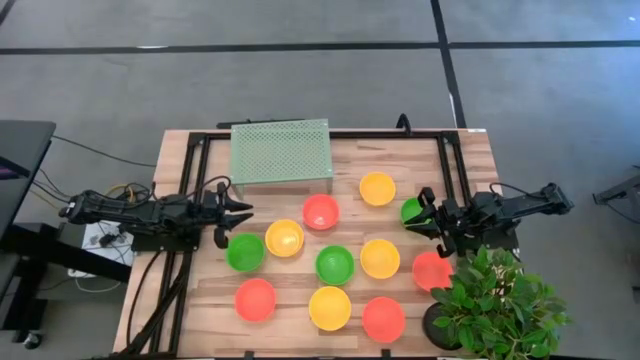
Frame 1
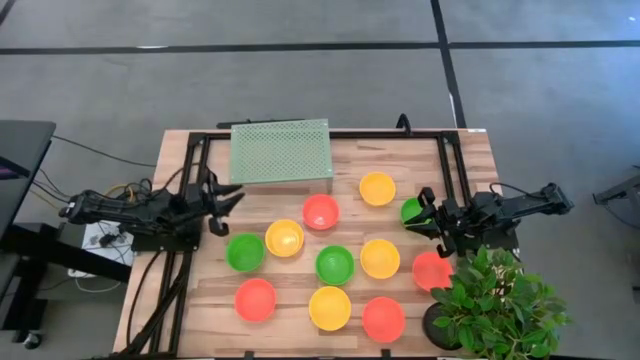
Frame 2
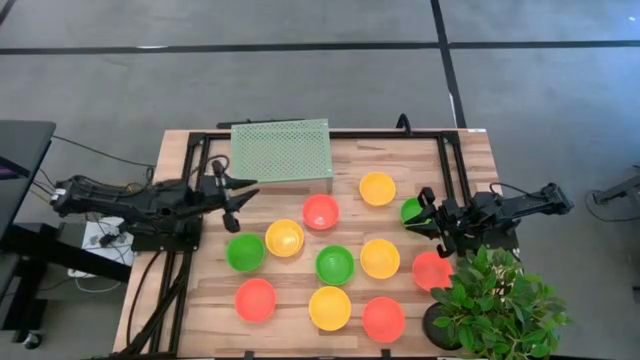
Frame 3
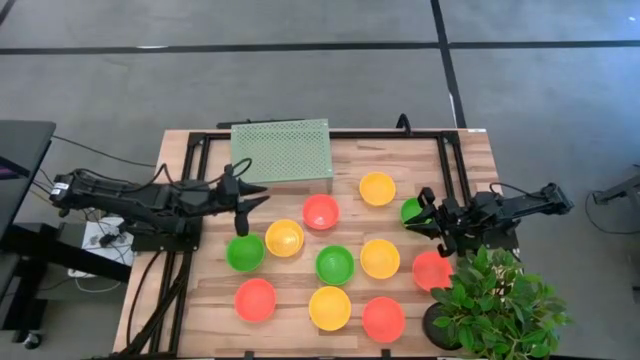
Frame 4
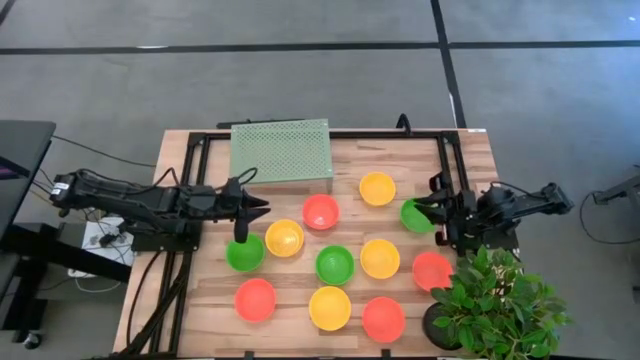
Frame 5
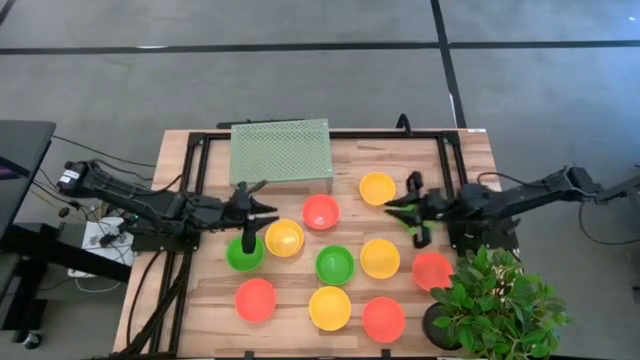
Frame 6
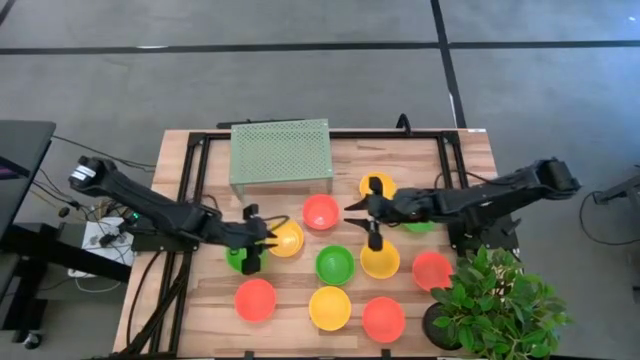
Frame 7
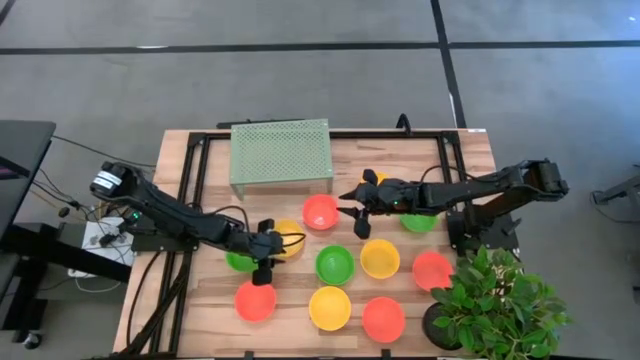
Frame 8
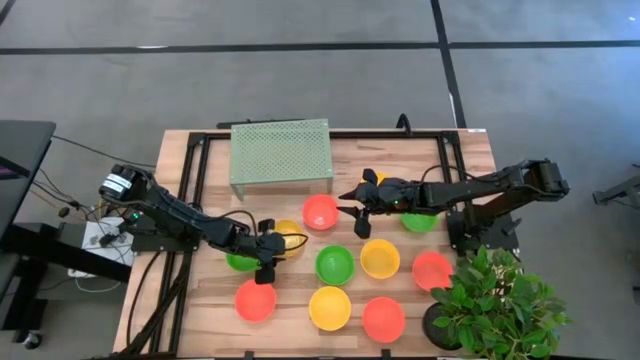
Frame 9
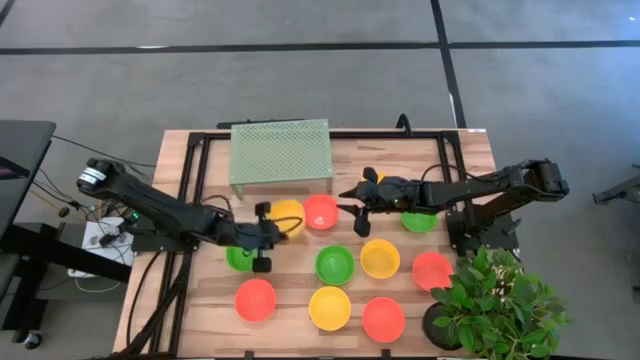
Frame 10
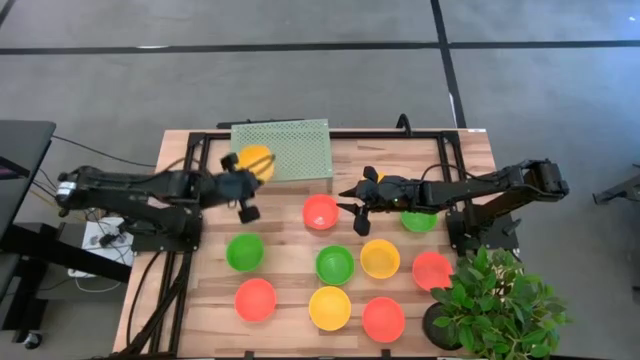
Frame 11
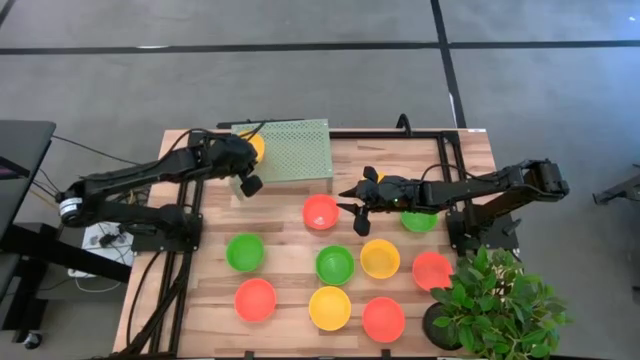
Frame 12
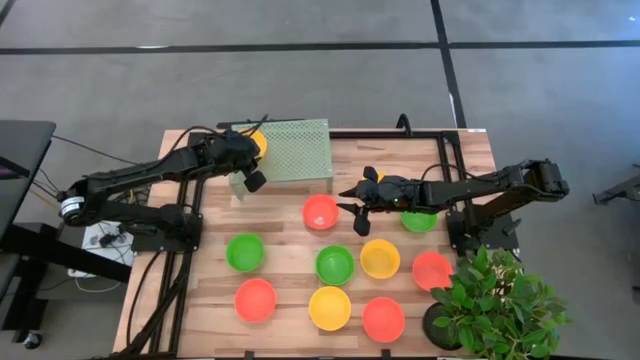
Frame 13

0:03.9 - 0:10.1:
Task: Pick & Place Mini bowls
Put the yellow bowl on the shelf

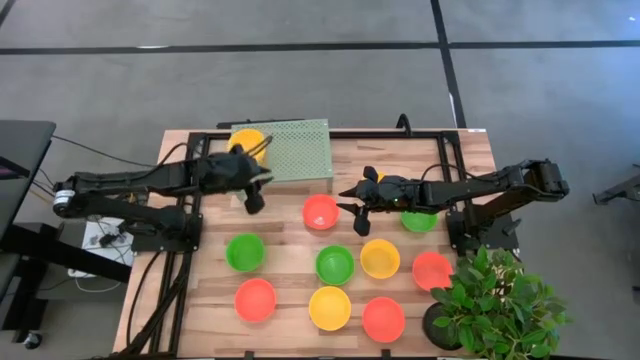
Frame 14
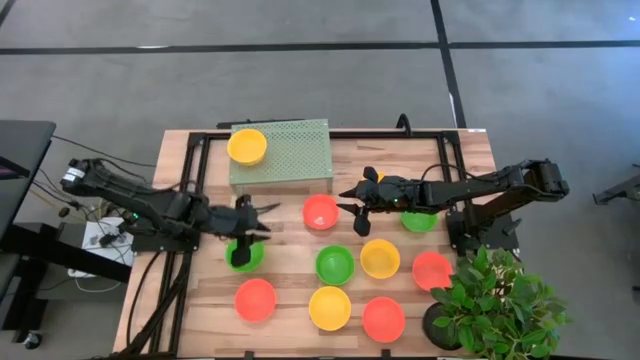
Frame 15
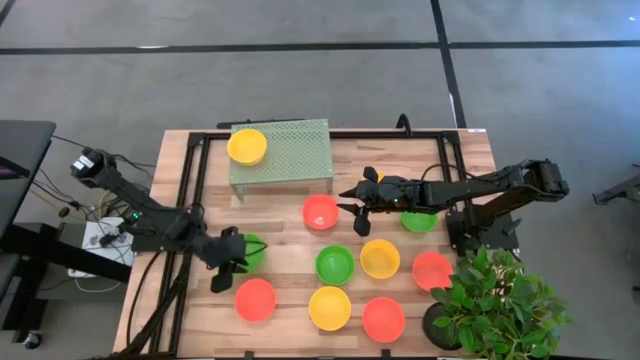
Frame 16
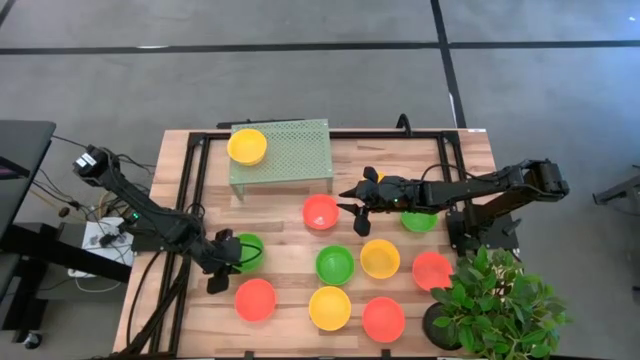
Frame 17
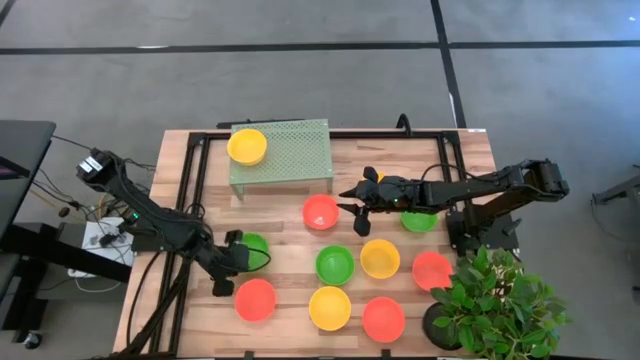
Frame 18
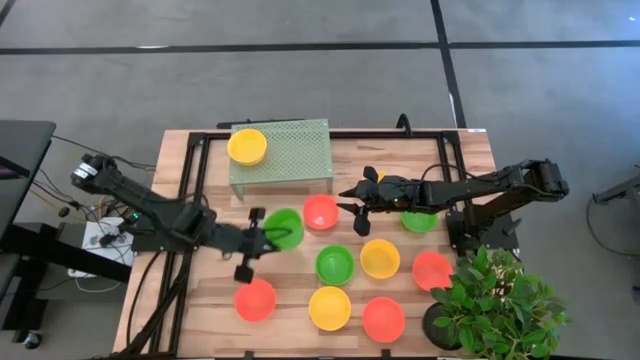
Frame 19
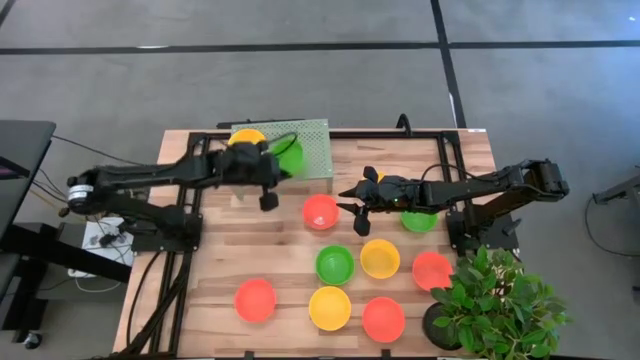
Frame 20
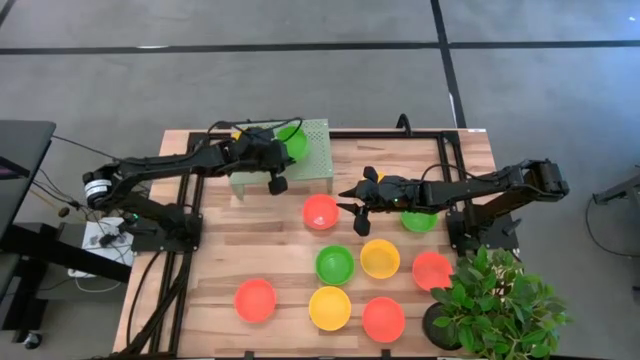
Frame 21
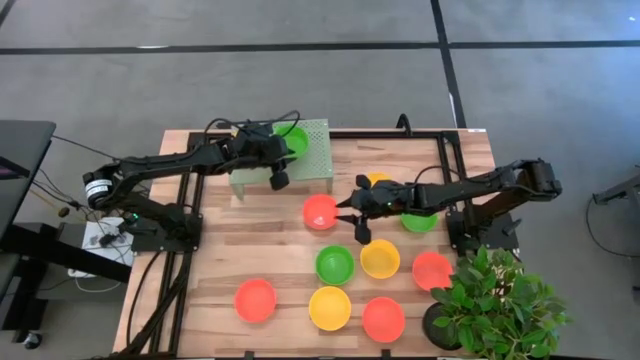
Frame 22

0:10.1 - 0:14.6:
Put the green bowl on the shelf

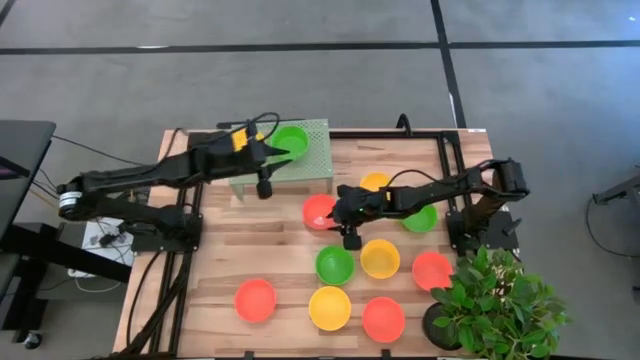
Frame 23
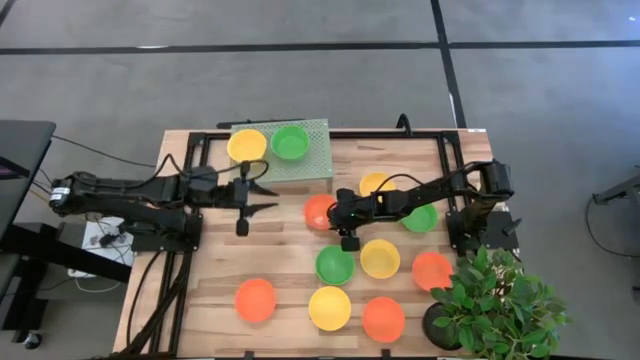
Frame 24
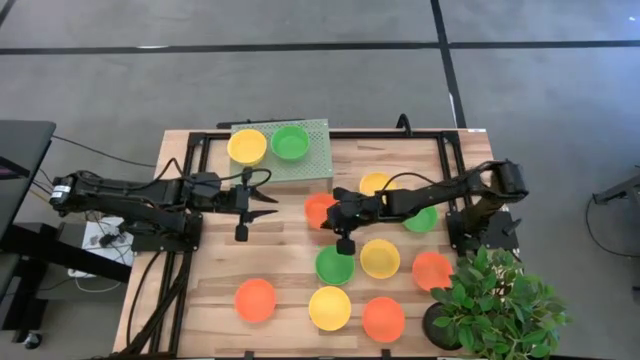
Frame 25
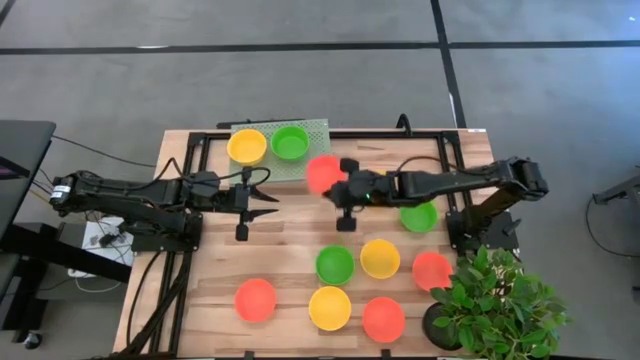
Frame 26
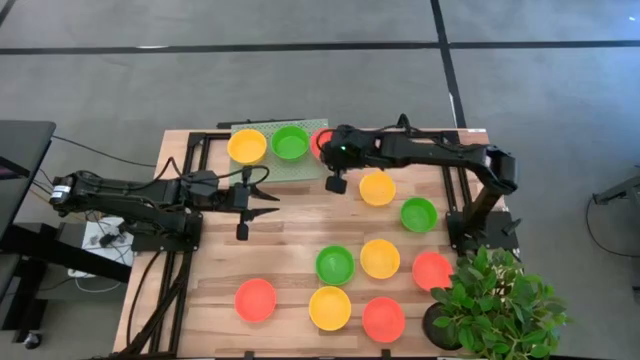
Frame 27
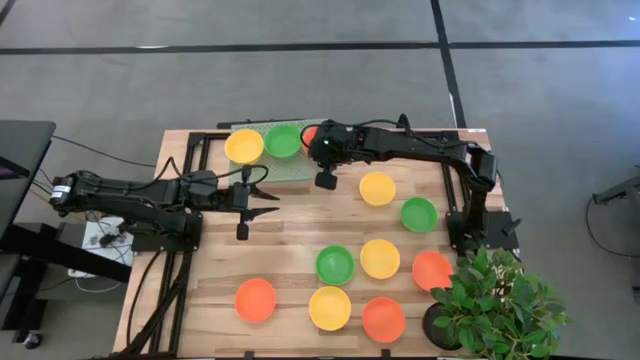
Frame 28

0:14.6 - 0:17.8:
Put the orange bowl on the shelf

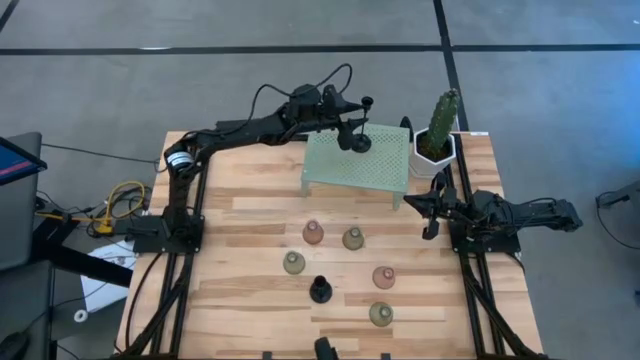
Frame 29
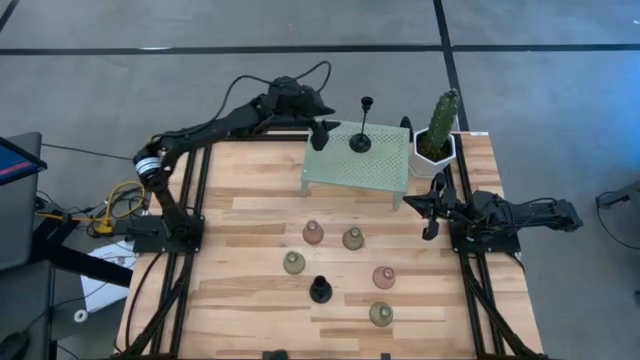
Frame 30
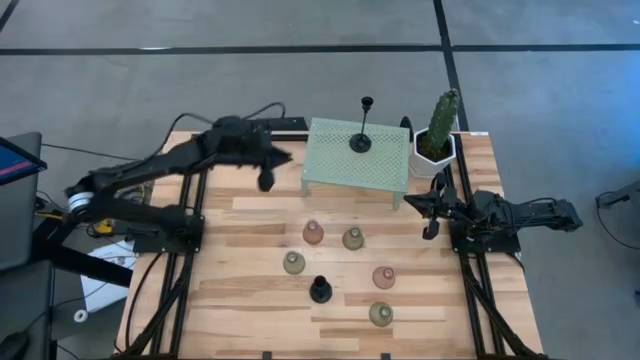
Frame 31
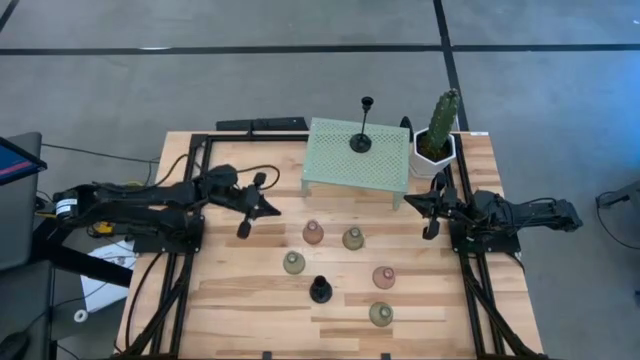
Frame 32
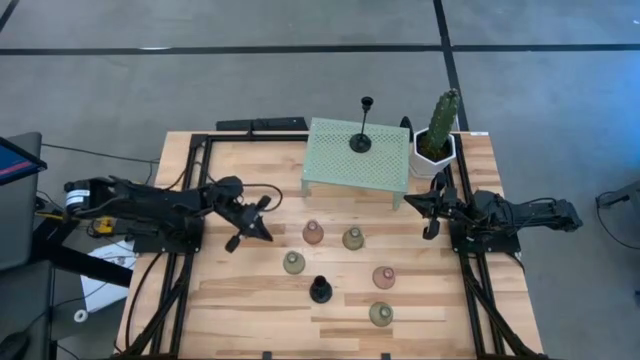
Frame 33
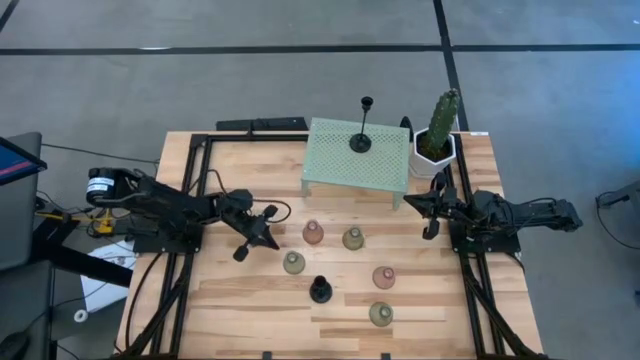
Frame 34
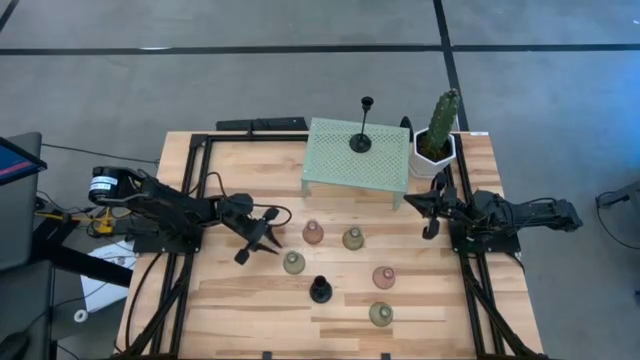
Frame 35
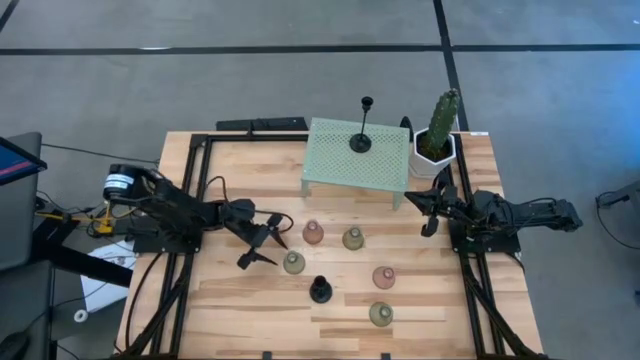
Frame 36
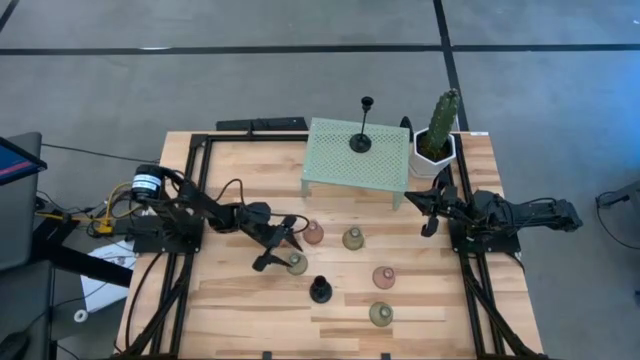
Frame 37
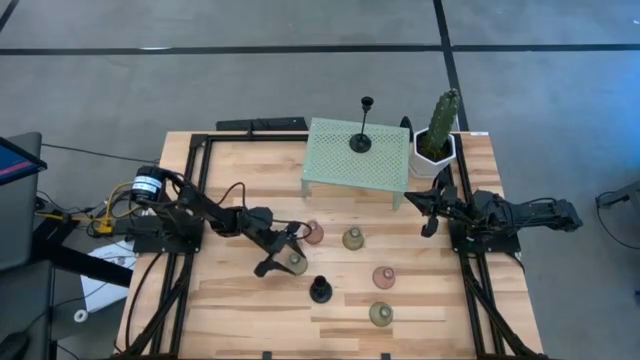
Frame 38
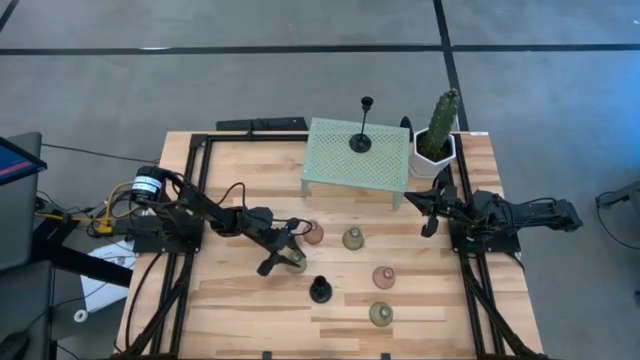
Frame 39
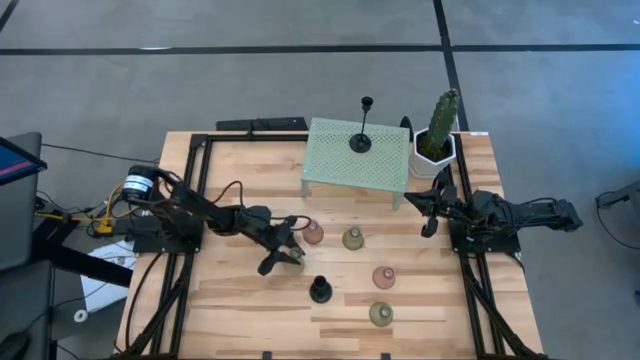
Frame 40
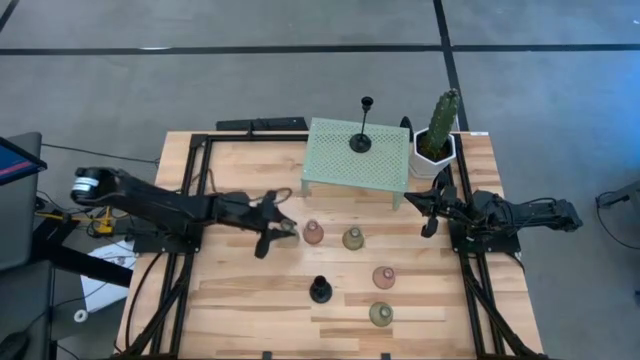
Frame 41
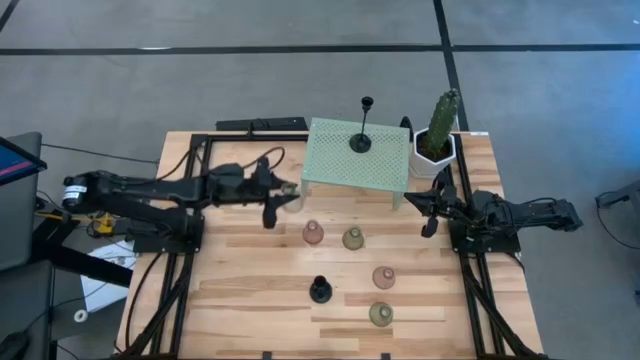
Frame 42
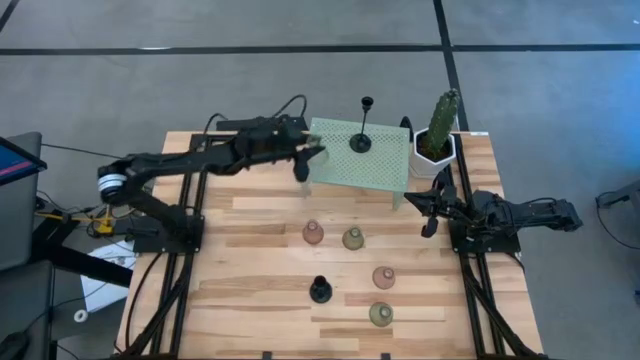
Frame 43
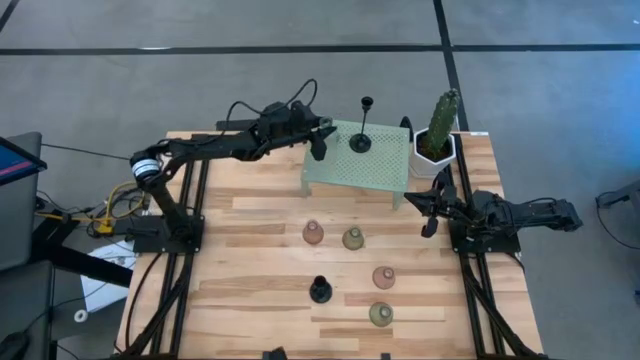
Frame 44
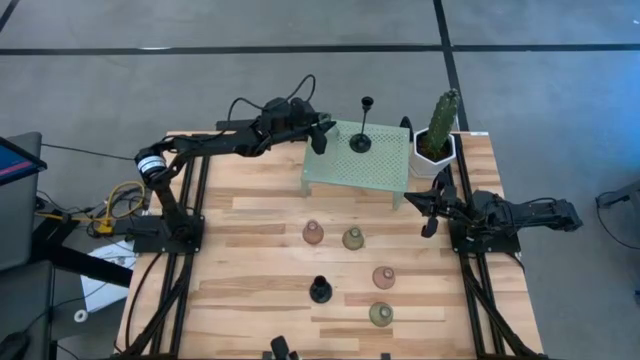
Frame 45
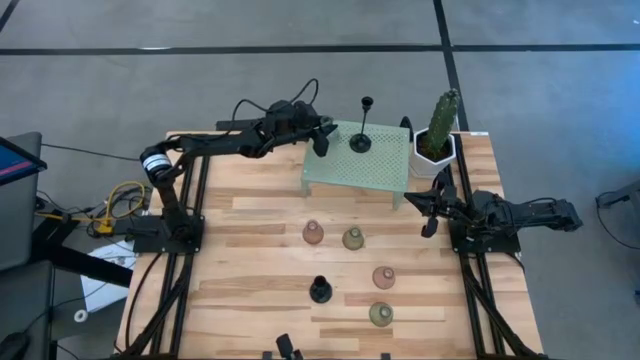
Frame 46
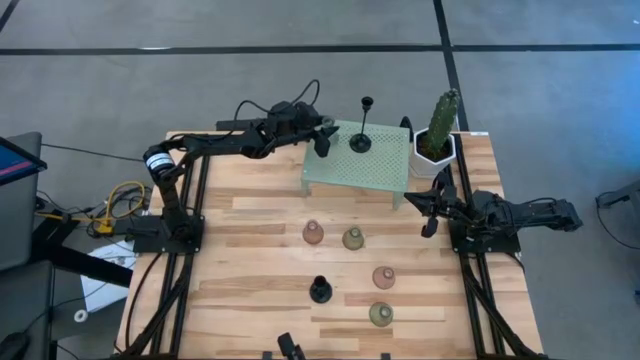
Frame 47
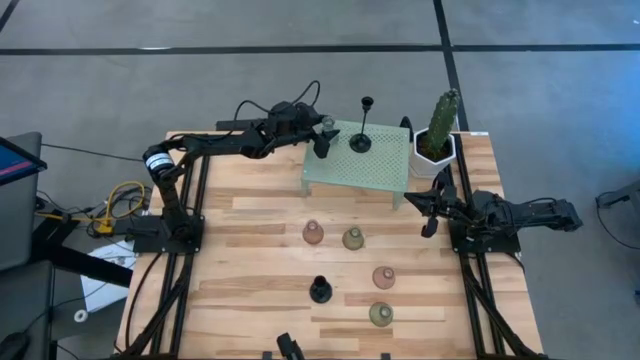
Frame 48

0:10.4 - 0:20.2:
Task: Pick & Place candle stick holders
Put the middle green glass candle holder on the shelf
